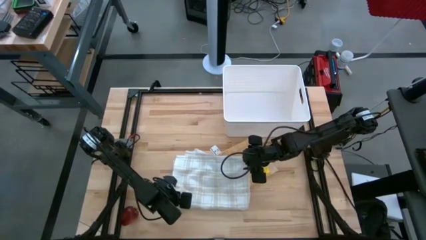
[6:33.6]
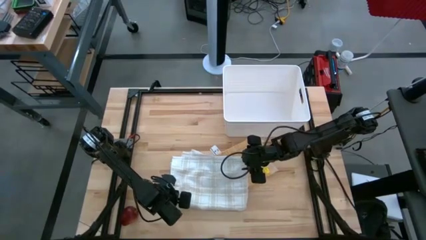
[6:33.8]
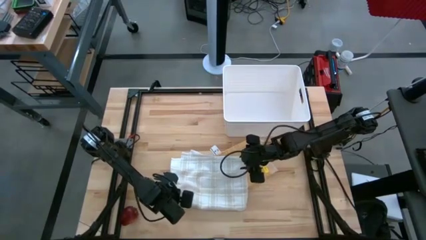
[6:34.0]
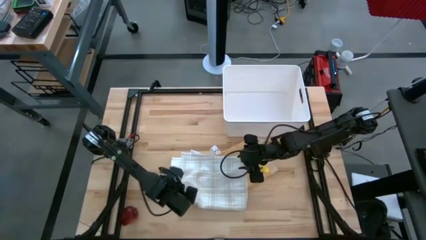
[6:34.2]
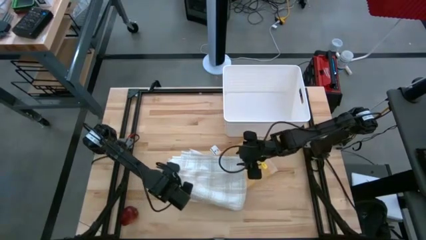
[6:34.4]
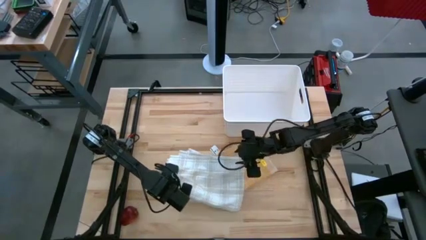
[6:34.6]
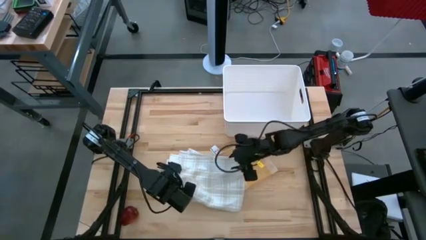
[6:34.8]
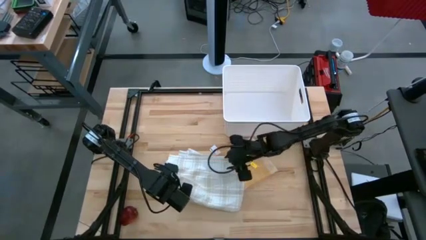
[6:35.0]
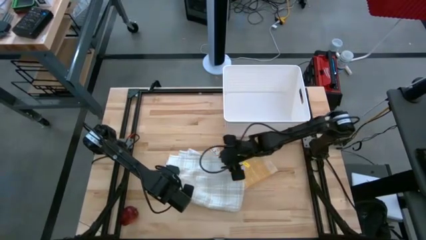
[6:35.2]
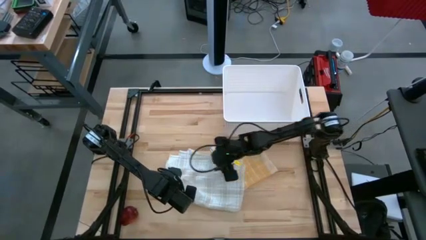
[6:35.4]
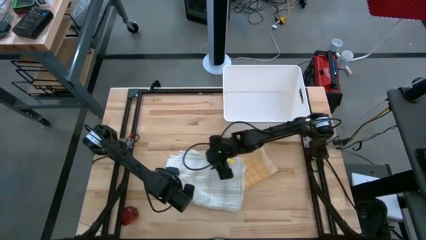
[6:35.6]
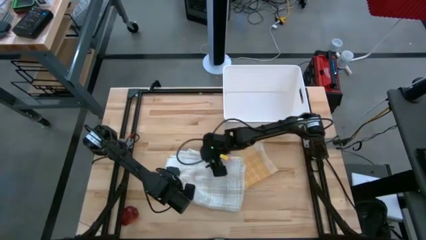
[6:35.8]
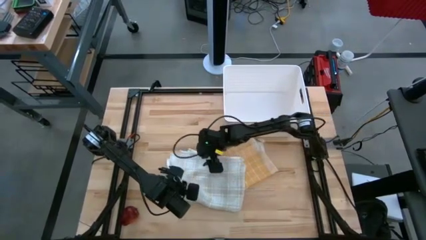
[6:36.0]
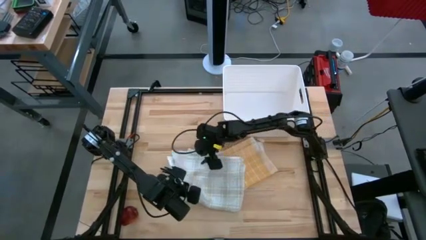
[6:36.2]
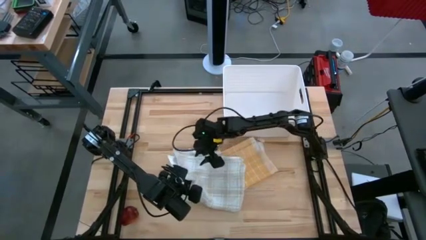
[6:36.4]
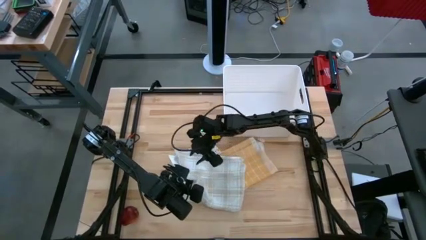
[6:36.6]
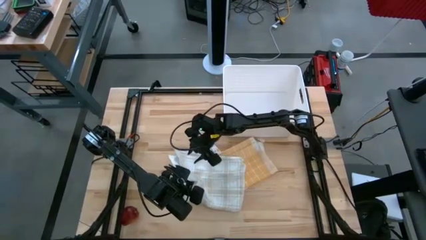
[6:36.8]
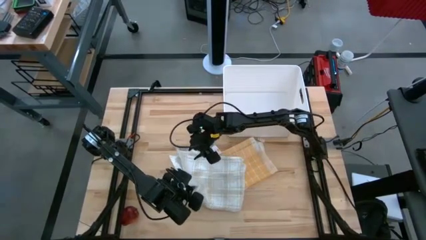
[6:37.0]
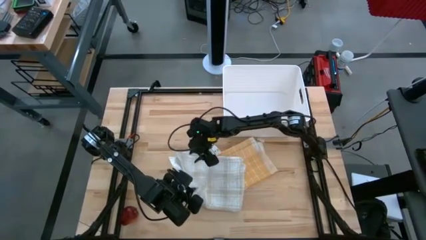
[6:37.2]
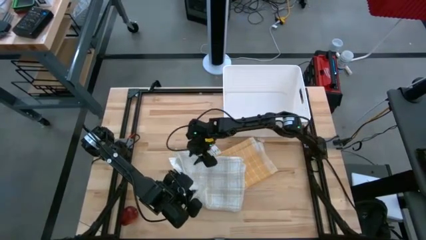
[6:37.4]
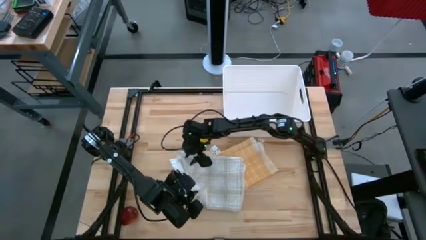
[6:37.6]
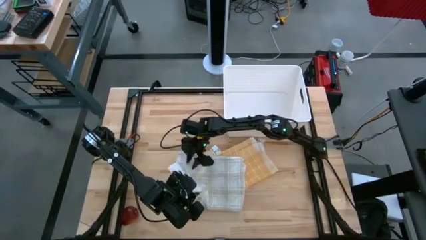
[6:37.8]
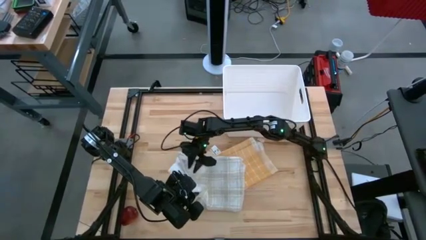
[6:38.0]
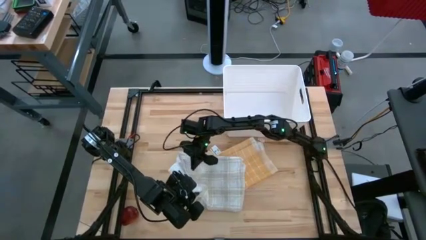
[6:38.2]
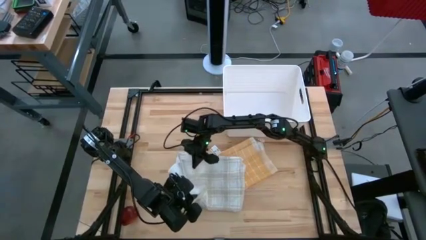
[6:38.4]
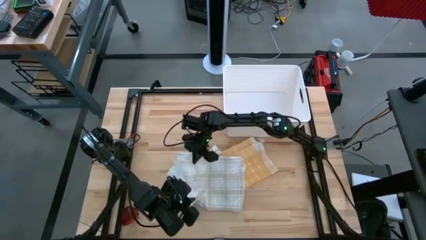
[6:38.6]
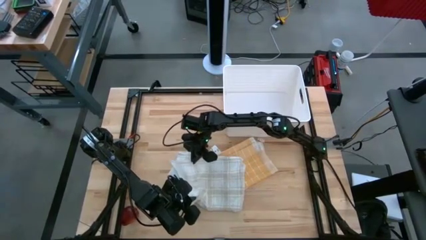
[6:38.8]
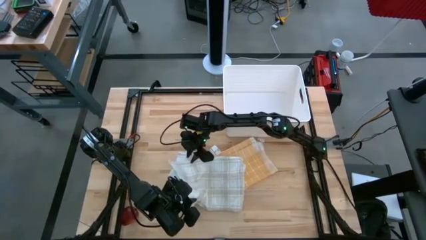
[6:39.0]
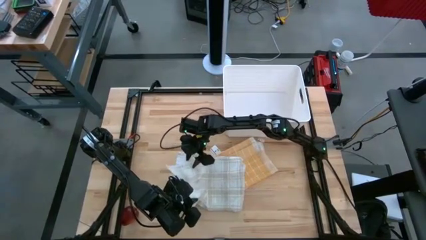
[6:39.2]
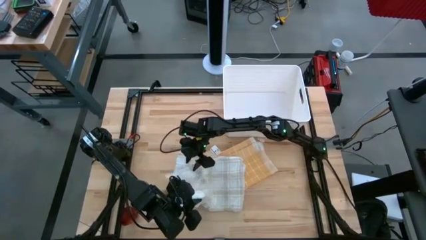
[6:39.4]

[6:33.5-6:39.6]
Task: Fold towel
Fold the white checkered towel

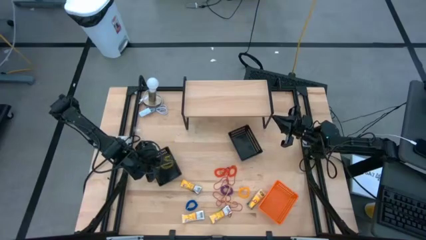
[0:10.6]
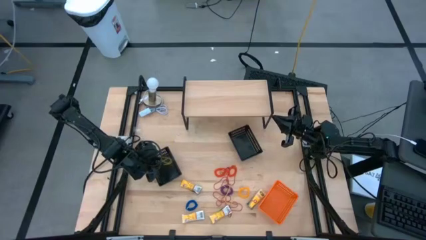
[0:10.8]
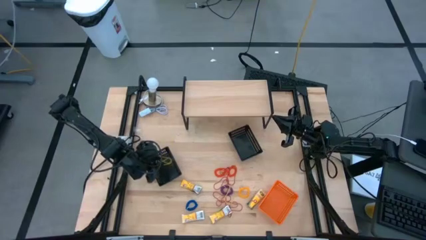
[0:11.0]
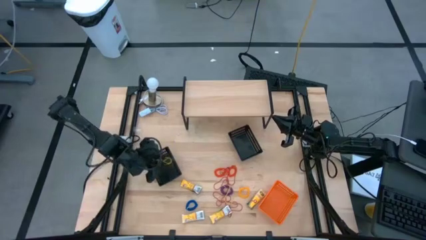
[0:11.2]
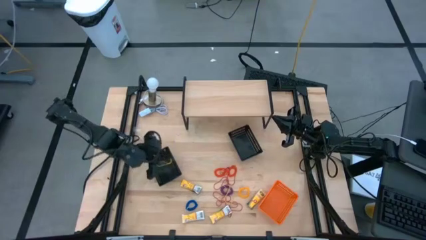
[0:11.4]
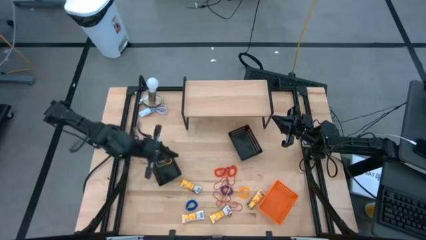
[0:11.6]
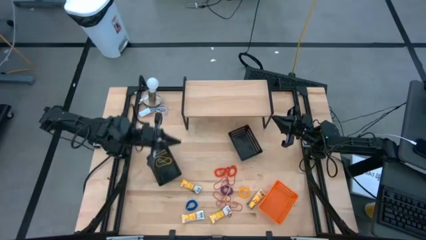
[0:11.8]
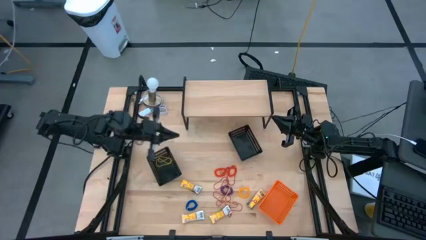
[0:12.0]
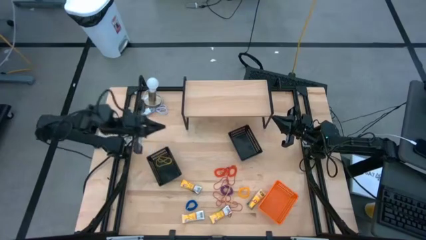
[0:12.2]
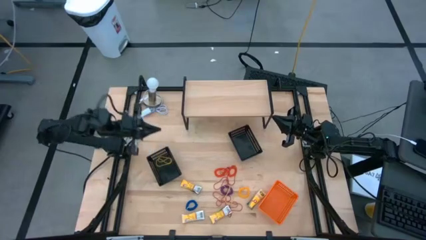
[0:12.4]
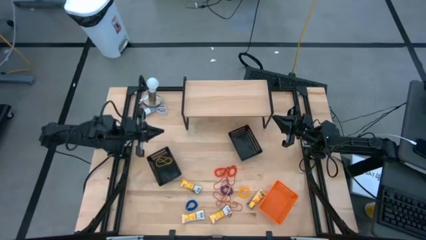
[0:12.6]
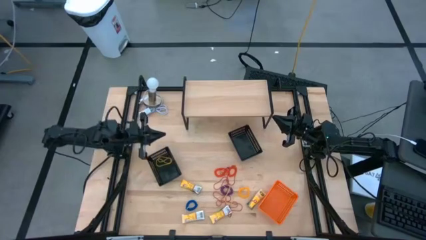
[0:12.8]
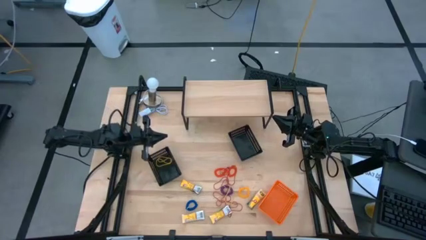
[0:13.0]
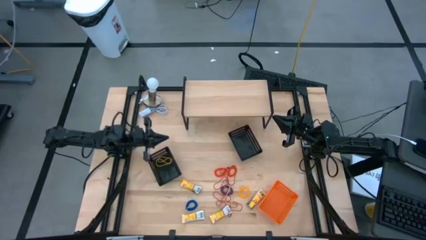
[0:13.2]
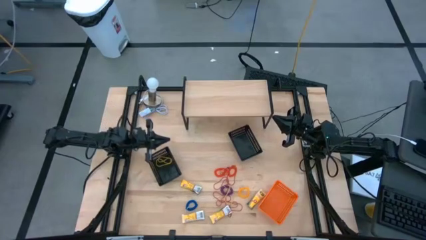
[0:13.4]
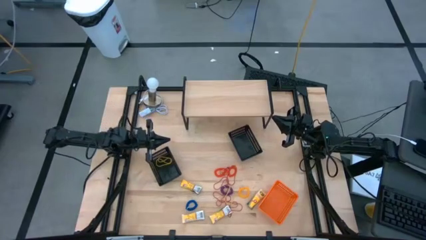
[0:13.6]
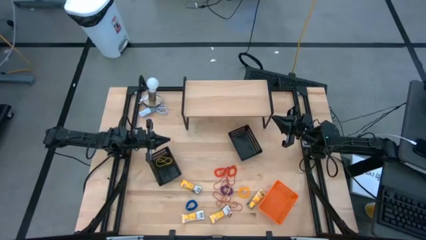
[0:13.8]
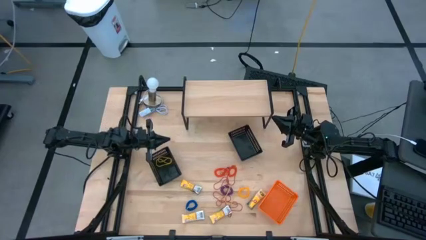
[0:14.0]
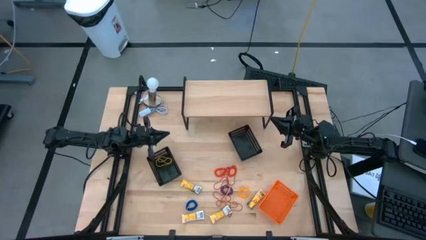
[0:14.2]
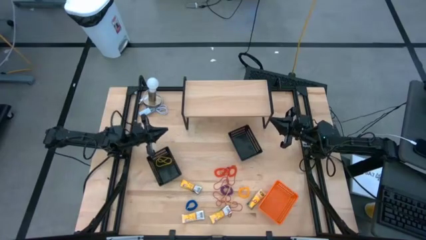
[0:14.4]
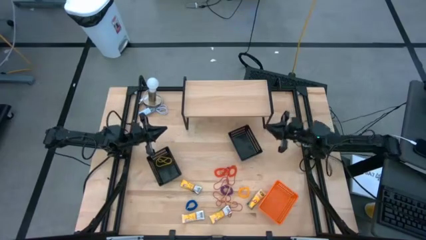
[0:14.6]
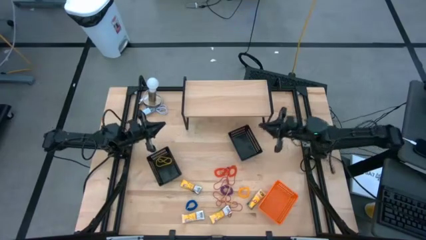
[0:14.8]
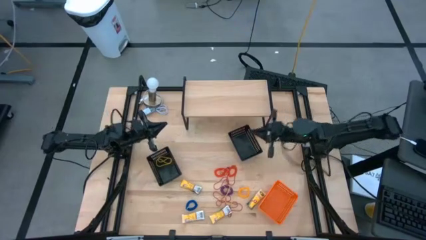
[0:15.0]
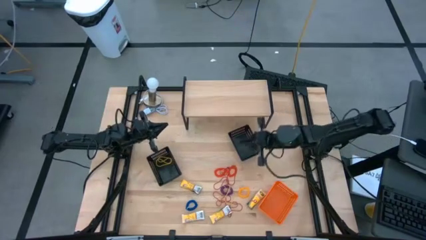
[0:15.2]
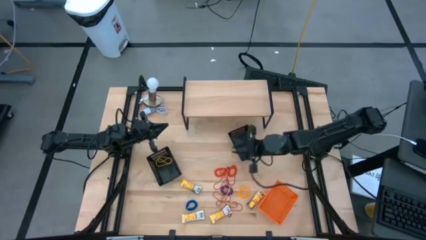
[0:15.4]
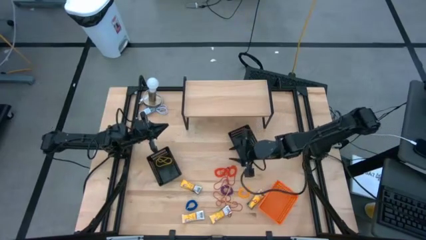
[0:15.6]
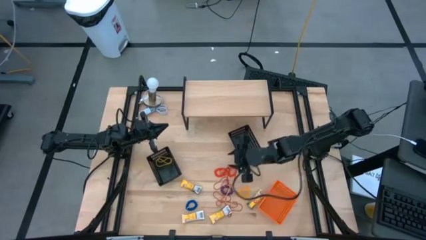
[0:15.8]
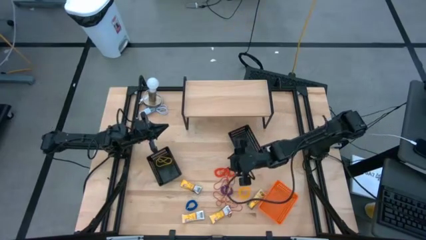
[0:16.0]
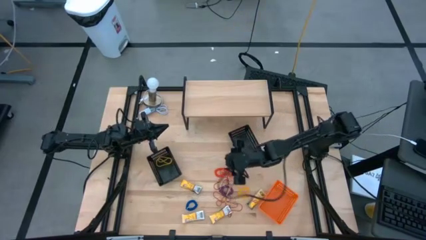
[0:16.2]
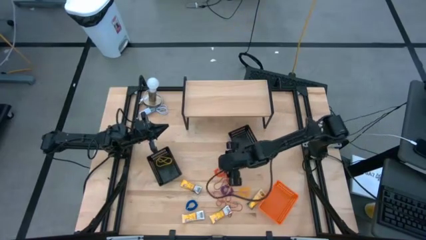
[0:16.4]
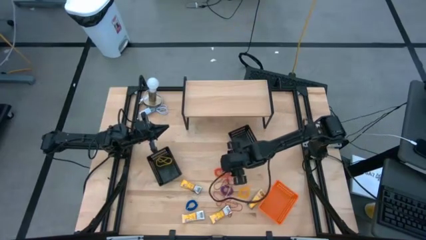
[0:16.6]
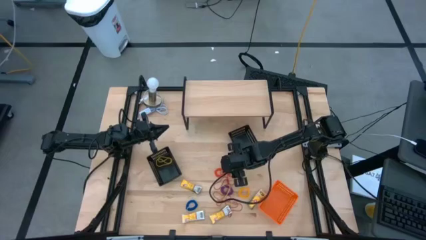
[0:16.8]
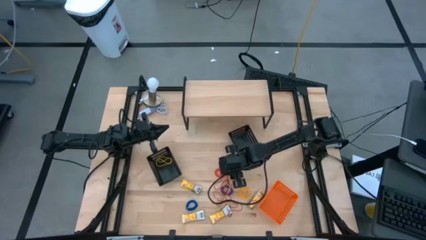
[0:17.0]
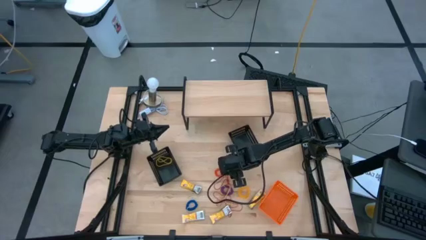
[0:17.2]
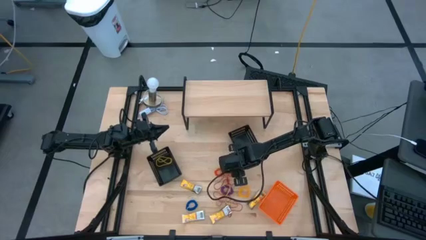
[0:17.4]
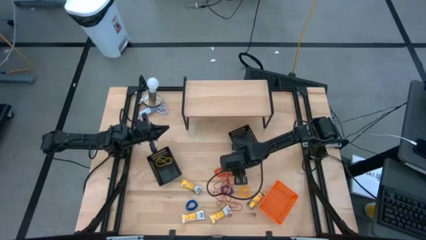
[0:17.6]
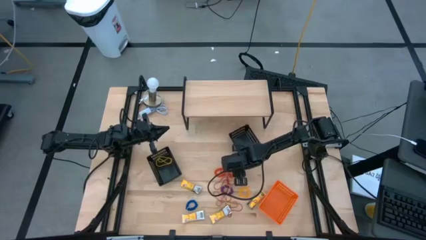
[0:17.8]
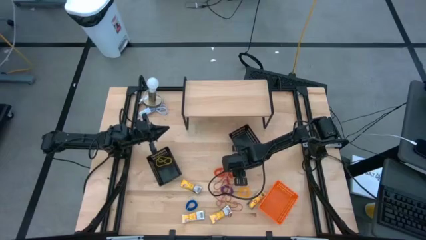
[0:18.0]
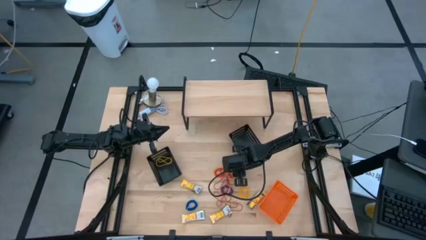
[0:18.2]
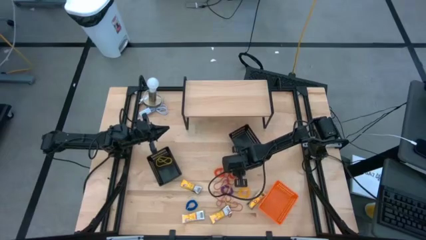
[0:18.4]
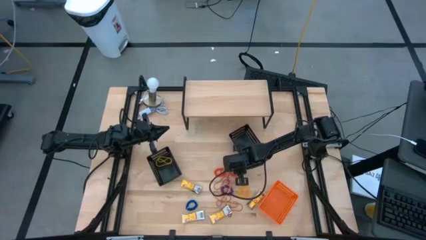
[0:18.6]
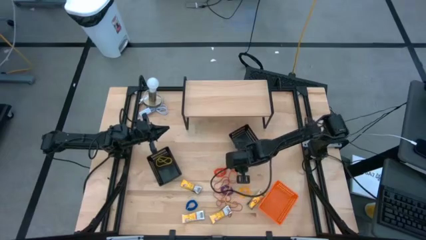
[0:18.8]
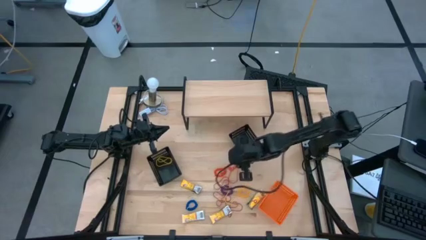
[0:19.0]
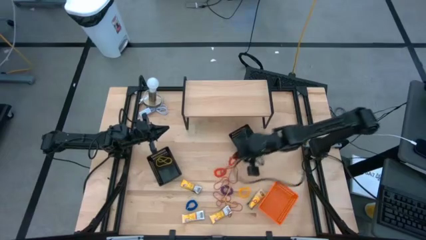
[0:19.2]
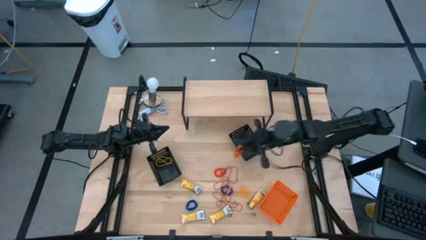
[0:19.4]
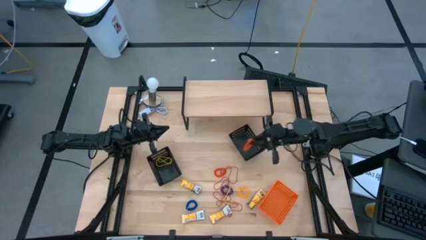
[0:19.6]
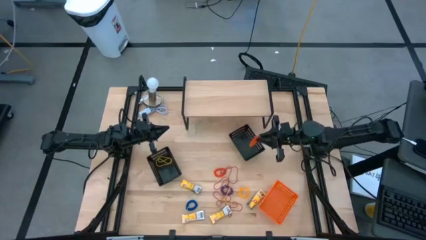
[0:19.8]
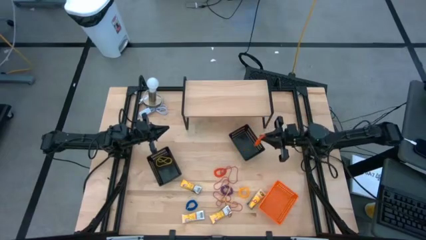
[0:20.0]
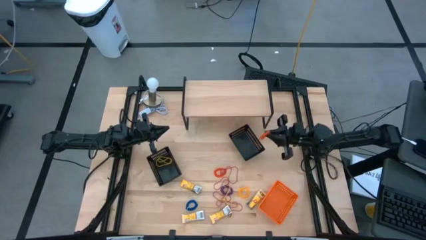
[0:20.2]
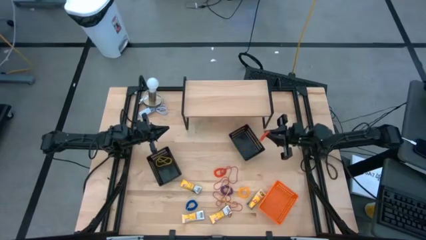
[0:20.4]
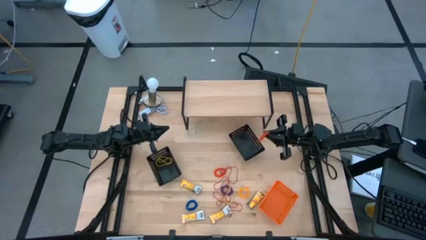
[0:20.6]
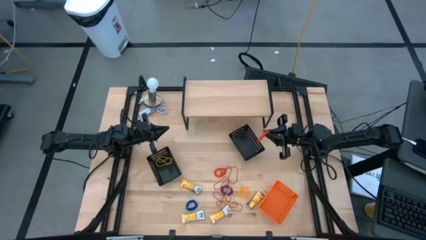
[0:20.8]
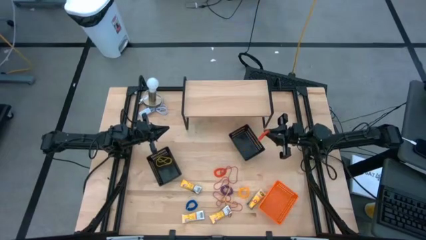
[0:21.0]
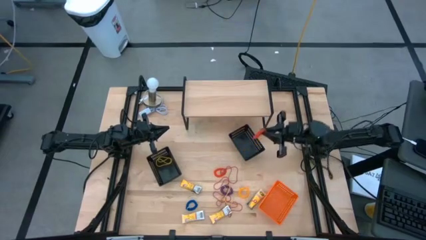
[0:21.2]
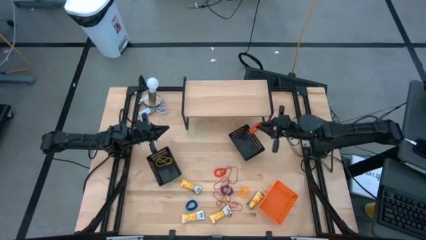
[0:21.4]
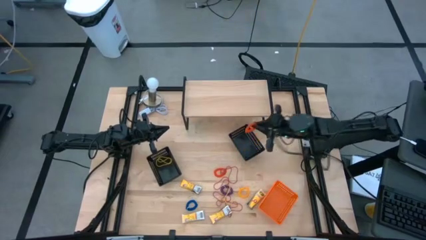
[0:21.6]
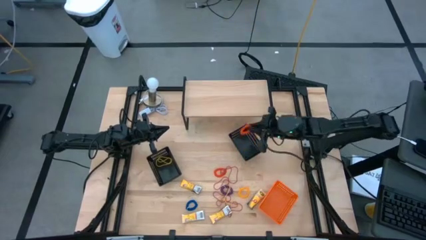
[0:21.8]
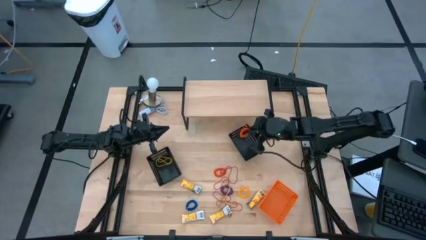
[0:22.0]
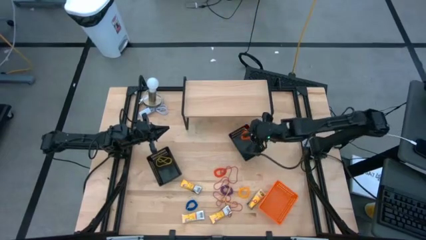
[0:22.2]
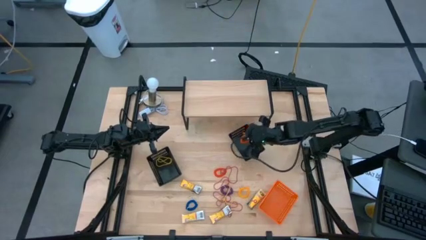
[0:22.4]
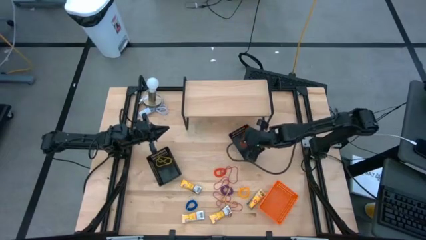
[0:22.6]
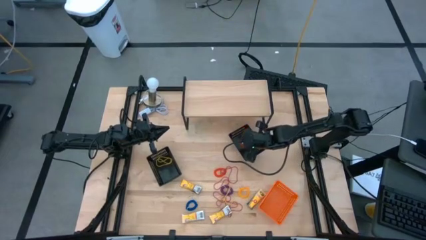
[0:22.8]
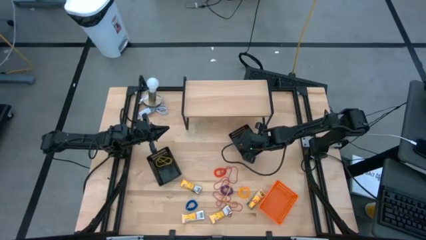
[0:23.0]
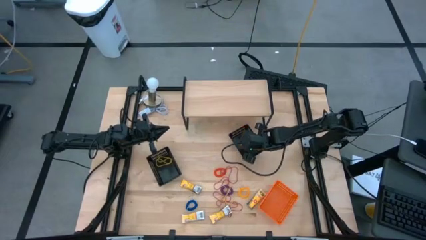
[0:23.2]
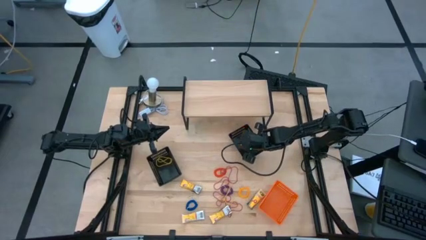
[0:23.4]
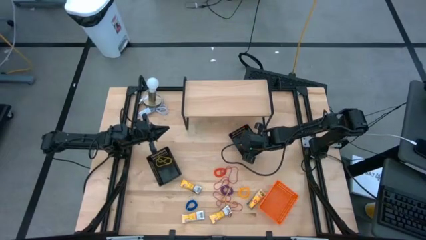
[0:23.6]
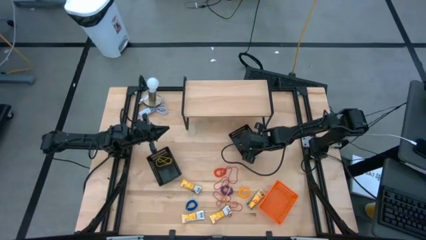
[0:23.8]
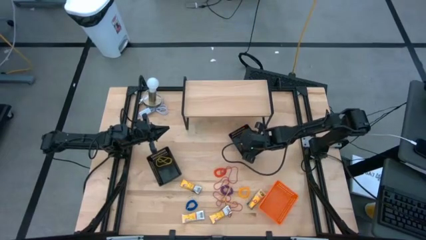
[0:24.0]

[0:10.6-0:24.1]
Task: Pick & Place Office Desk Supplies
Put the orange spring keychain into the right black bin
